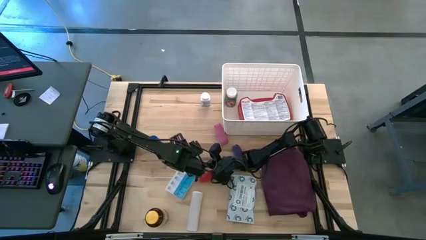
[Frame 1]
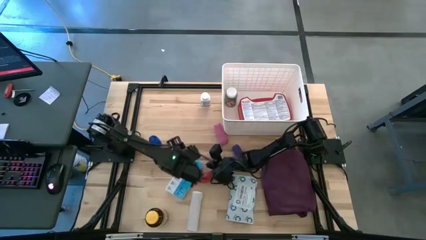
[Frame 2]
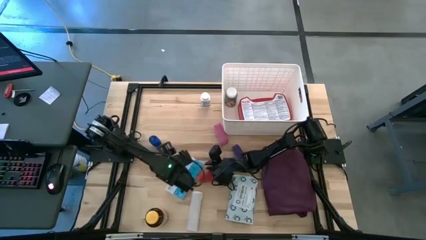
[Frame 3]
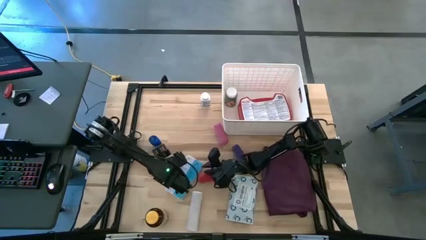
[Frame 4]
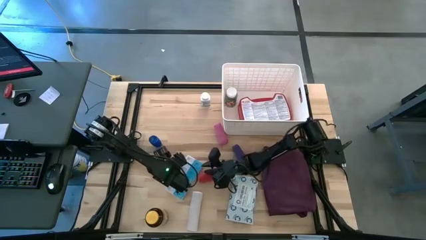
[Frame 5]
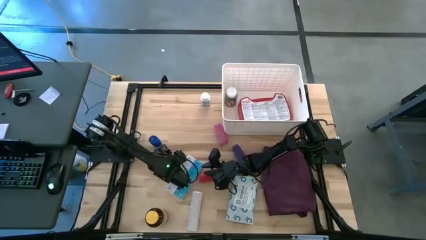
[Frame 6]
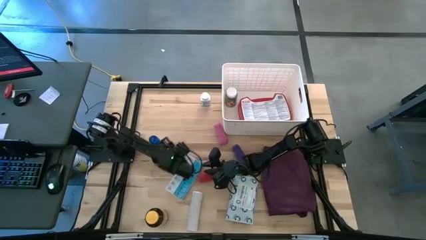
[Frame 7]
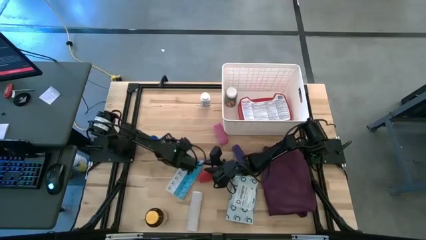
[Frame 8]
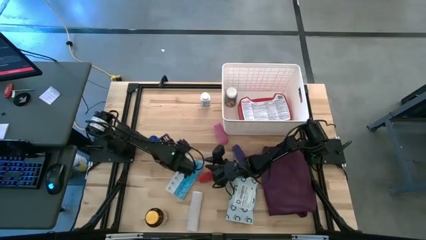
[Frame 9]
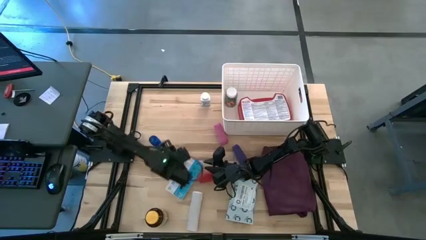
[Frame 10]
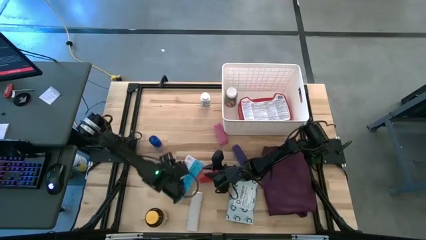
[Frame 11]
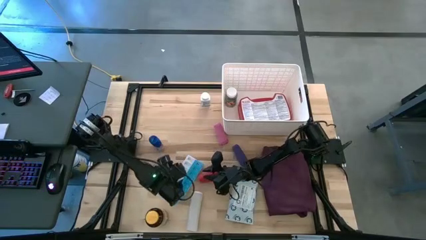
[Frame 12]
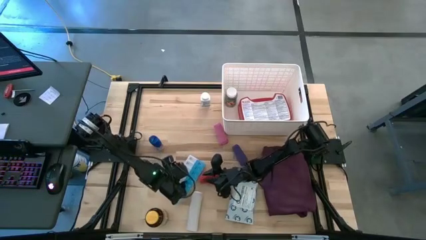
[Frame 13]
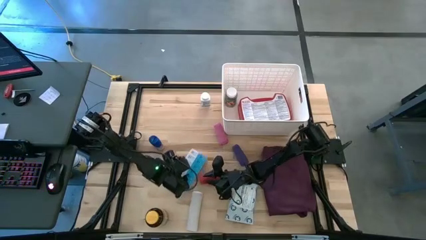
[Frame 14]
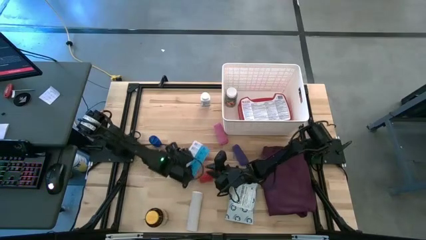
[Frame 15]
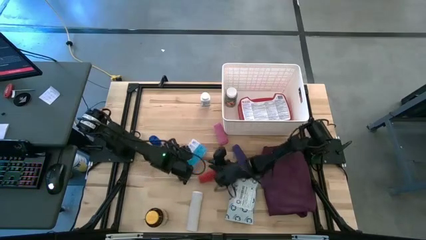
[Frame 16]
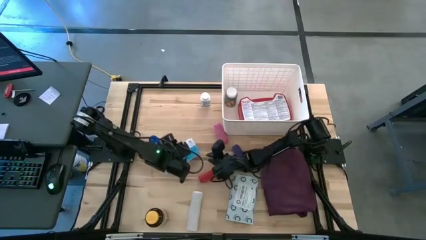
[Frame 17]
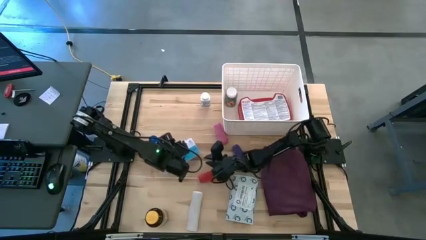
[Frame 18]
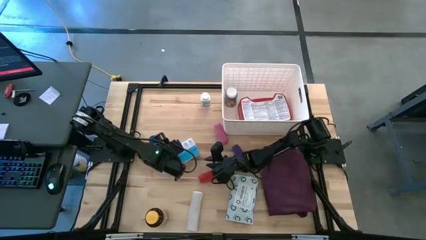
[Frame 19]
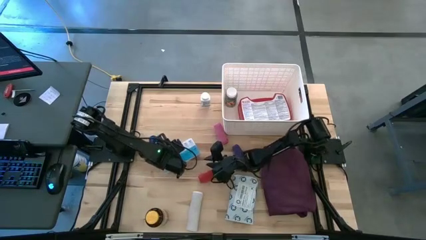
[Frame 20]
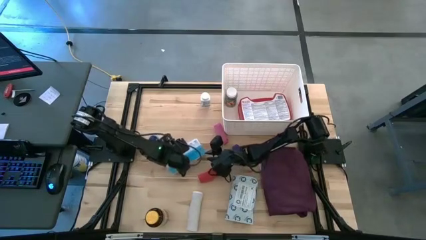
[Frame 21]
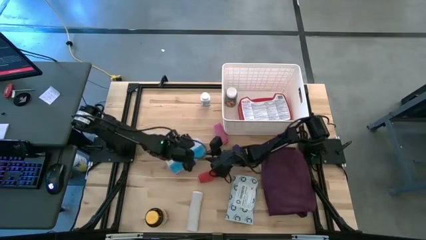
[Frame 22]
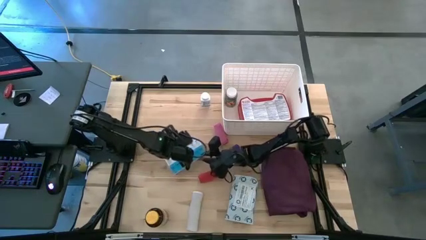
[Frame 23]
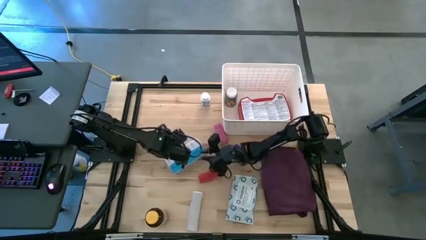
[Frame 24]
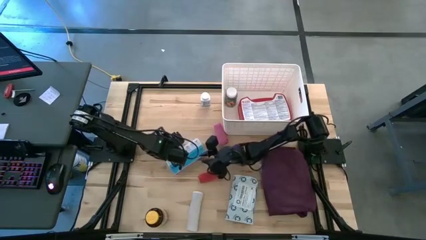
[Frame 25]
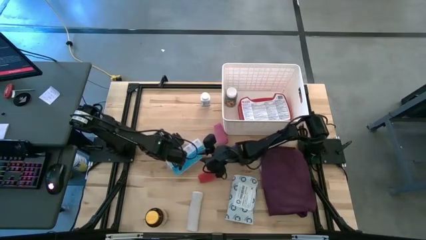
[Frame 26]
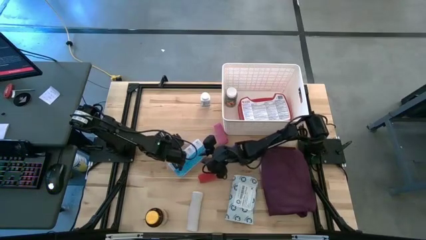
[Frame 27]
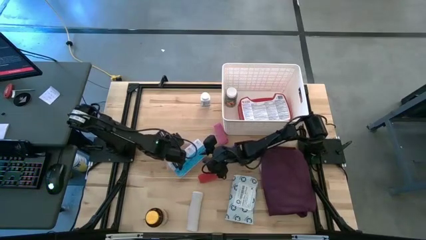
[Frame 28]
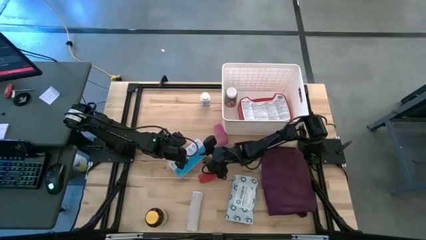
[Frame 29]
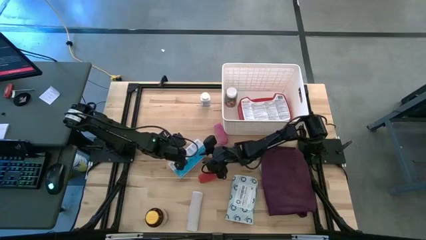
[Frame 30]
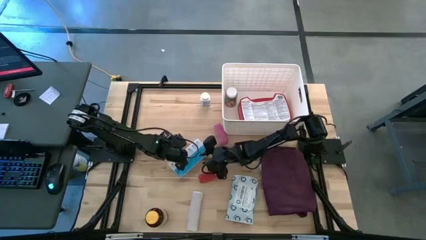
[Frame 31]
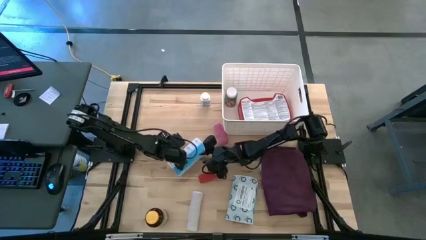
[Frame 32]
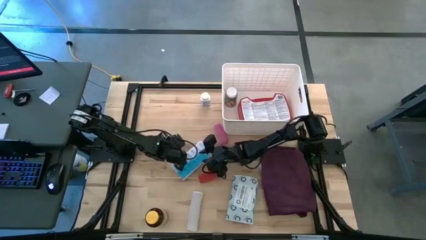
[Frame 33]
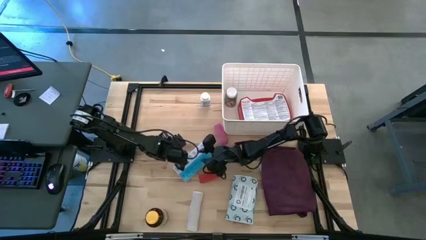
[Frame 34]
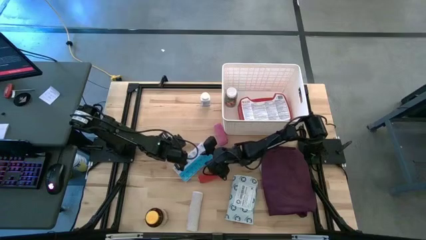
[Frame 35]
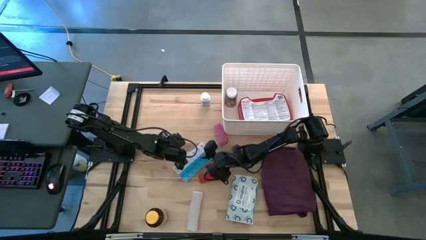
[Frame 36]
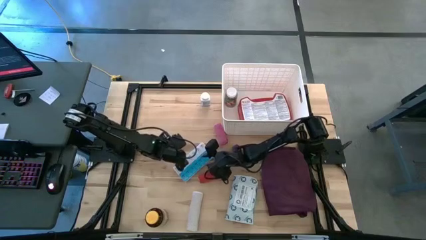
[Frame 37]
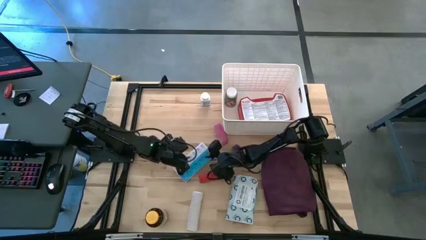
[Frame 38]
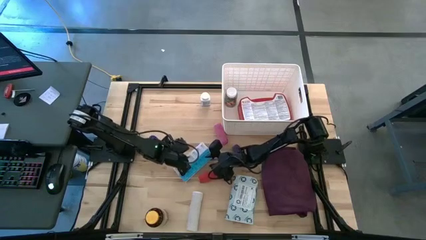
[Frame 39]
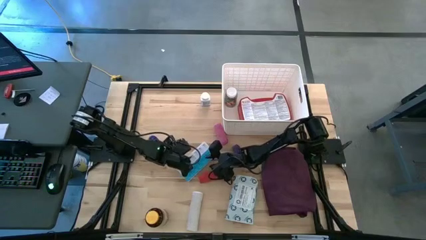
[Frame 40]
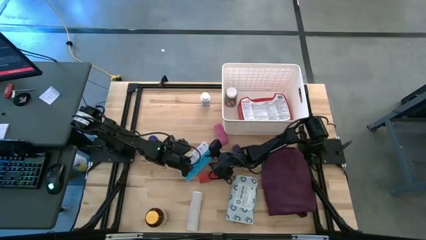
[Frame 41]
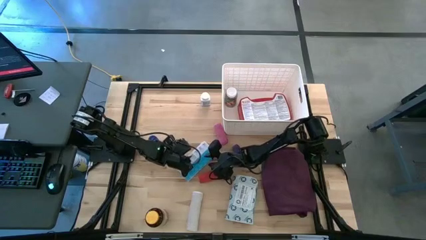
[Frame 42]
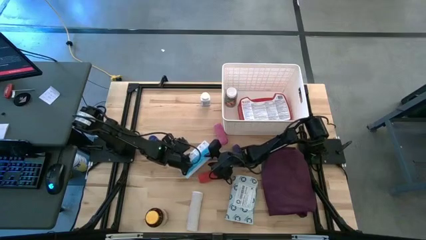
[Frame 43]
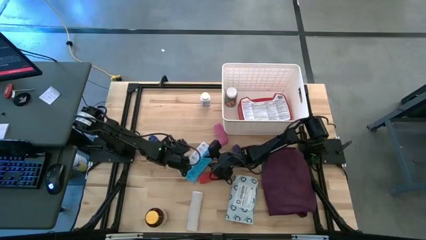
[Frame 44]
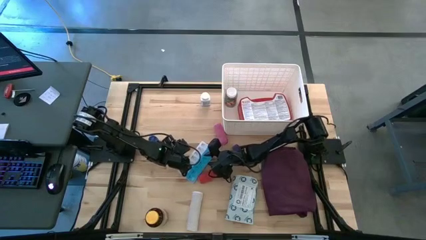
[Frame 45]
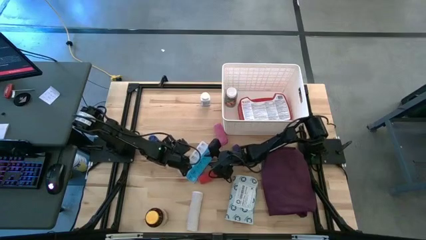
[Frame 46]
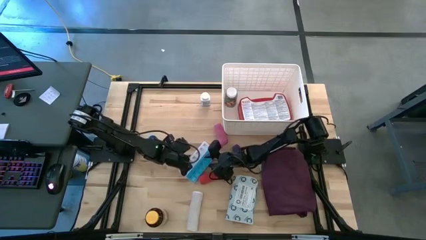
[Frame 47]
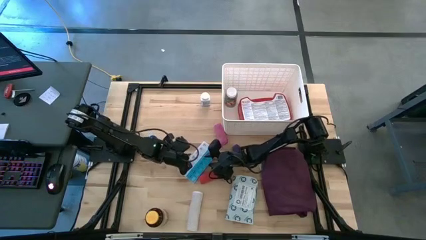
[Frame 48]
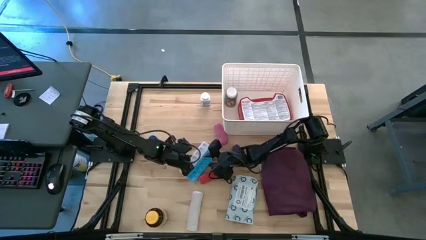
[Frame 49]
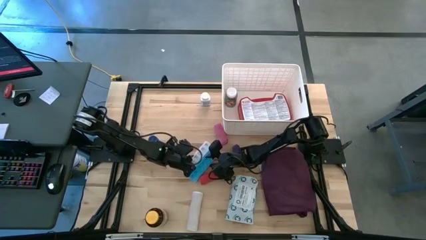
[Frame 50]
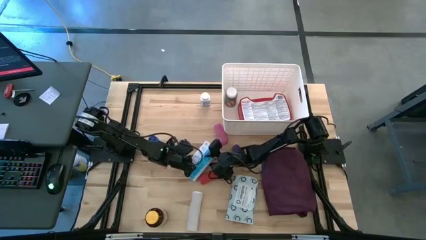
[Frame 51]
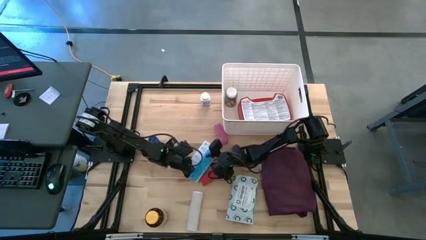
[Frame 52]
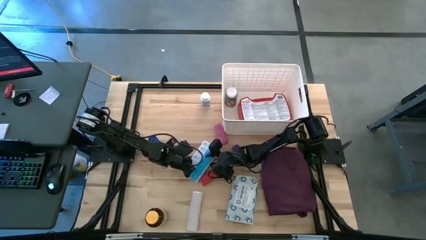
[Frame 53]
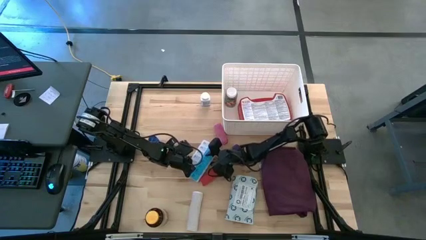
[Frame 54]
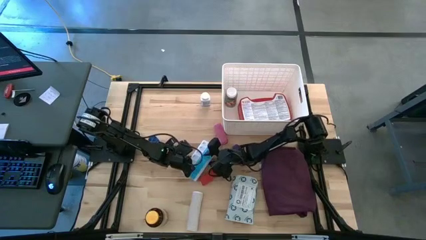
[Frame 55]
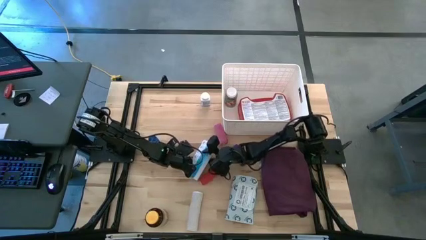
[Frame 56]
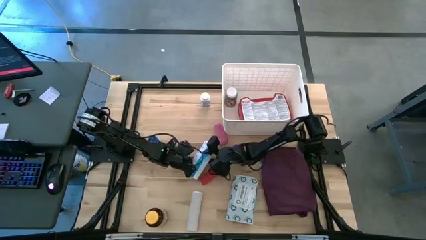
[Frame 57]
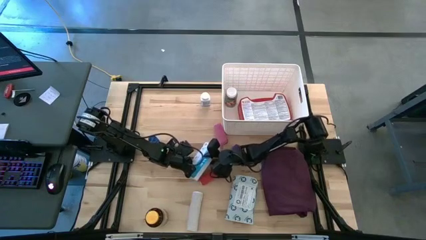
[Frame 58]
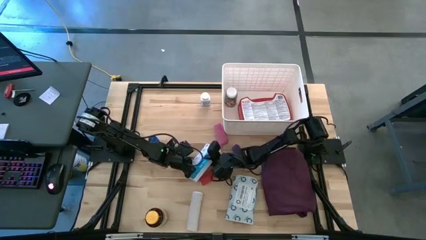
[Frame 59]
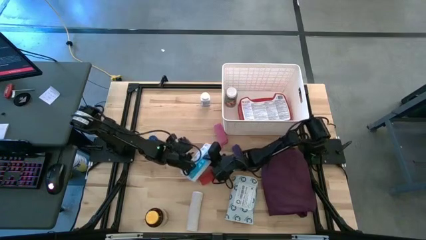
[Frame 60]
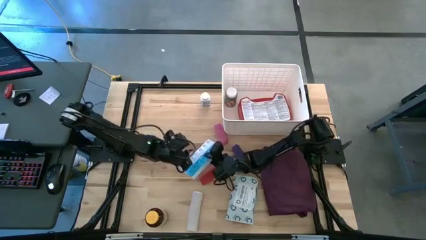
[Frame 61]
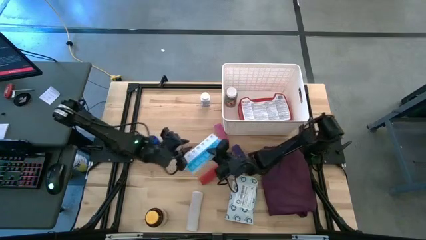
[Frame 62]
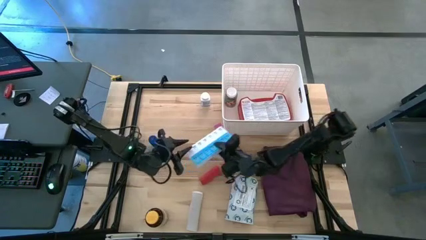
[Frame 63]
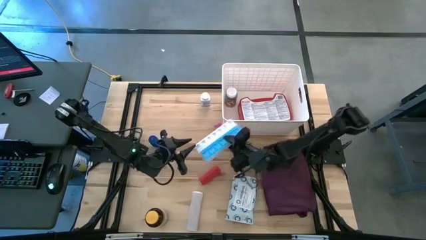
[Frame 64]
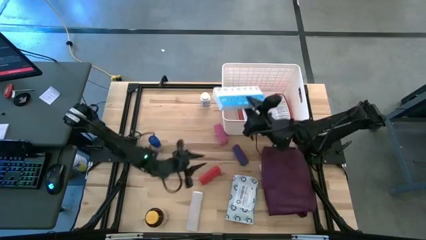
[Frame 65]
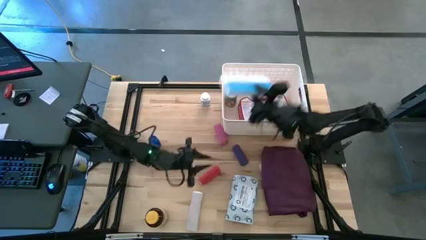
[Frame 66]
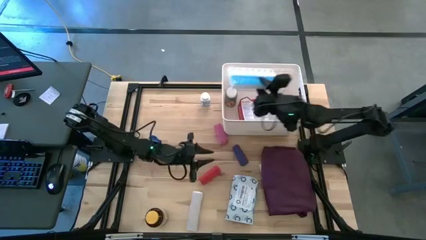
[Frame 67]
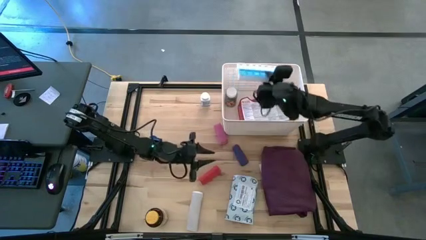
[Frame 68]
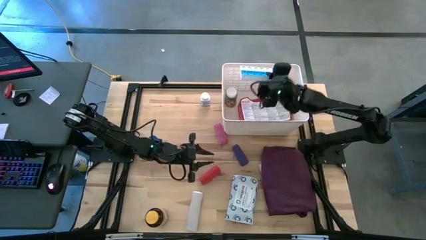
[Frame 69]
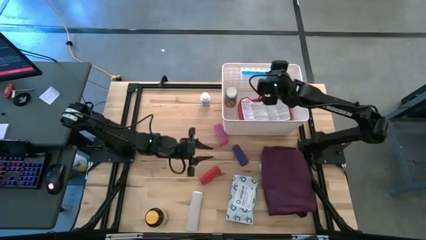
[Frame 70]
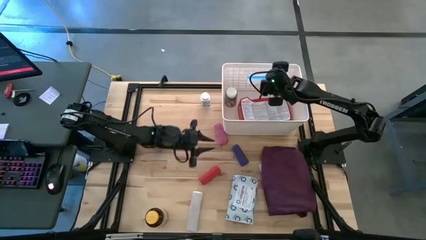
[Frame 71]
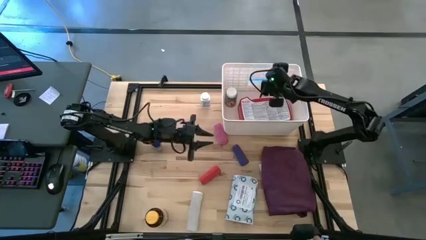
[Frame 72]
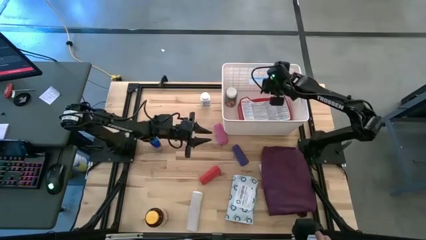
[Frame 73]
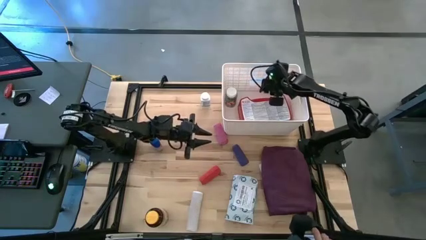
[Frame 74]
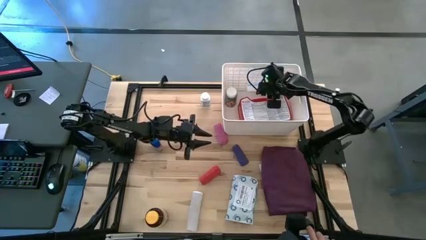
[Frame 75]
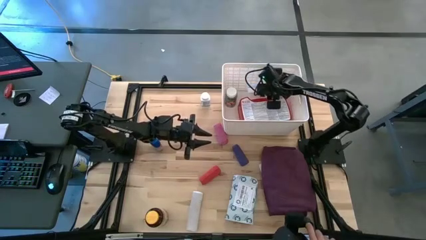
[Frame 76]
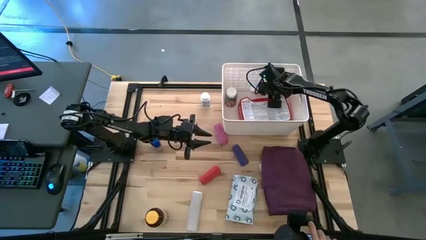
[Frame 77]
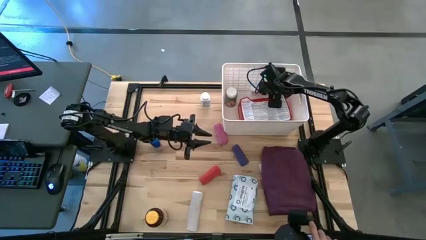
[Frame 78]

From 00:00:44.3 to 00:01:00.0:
Task: Pick & place medical supplies in basket/bin
Put the white medicine organizer into the white container

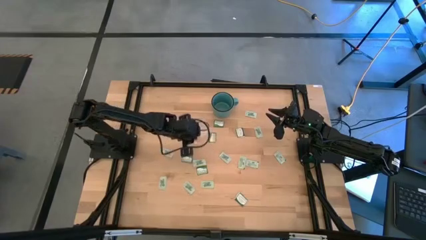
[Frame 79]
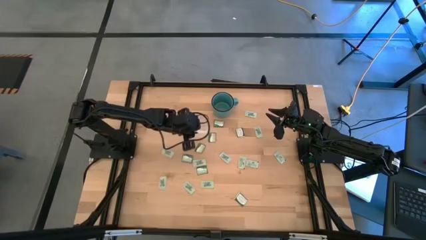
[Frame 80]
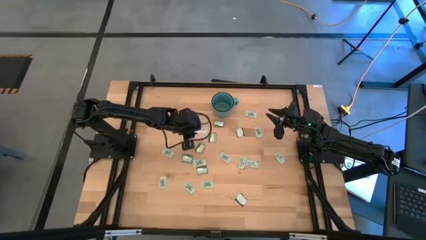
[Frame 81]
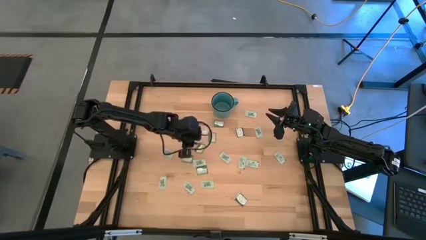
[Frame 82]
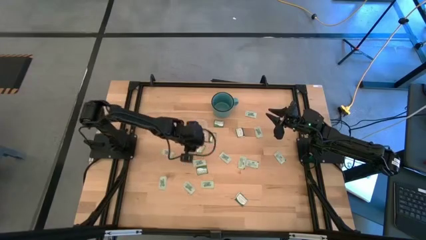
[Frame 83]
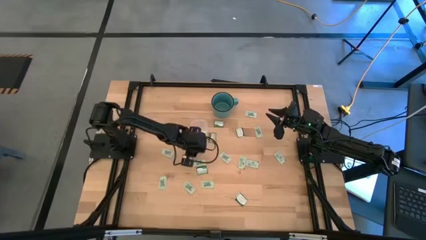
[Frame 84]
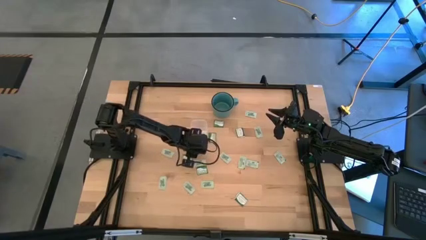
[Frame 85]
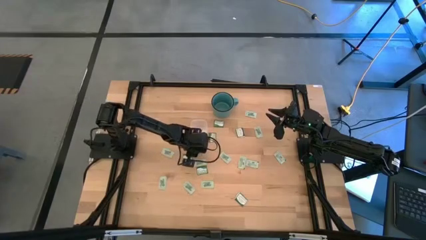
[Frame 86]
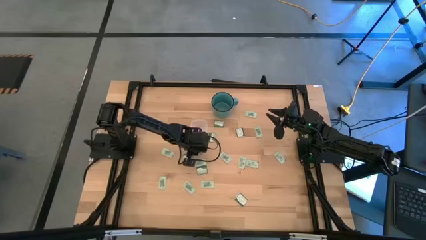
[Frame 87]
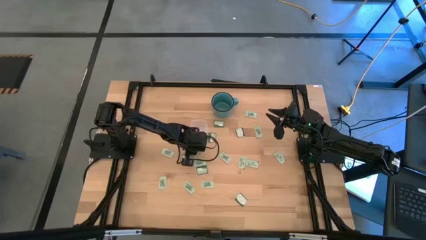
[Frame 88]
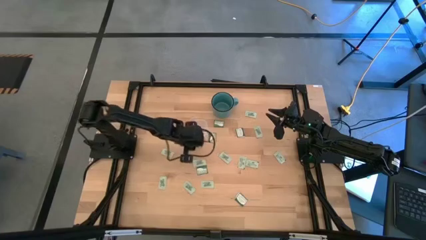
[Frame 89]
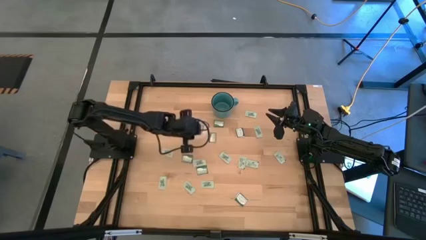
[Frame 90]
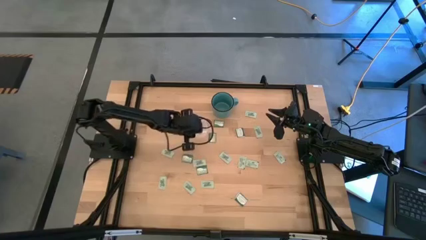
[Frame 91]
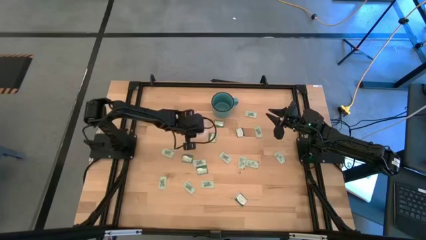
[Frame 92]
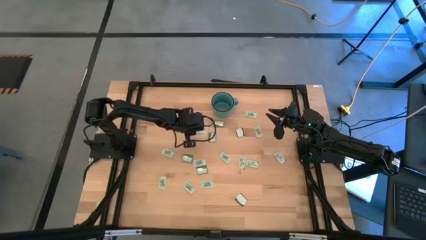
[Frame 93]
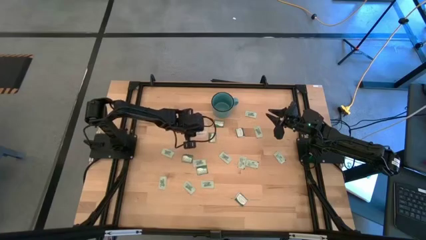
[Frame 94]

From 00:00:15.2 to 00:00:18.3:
Task: Pick and place Stevia / Truvia into bins
Put the dark green truvia packet into the transparent container
